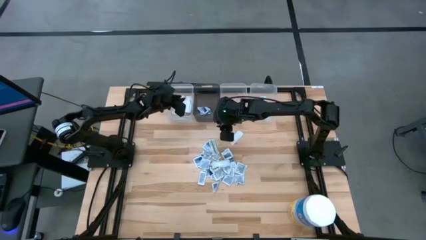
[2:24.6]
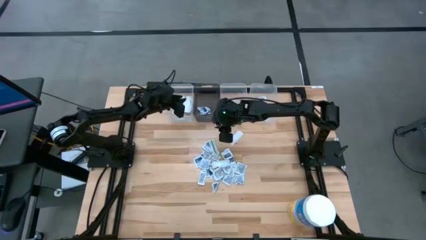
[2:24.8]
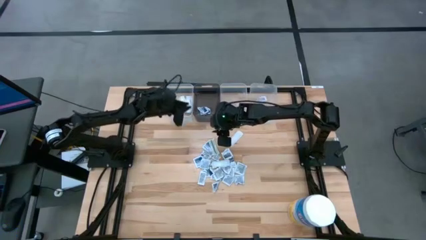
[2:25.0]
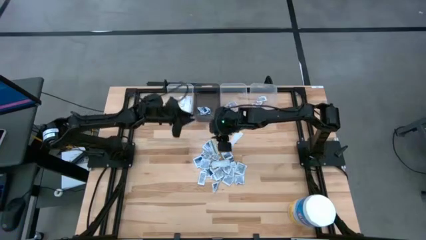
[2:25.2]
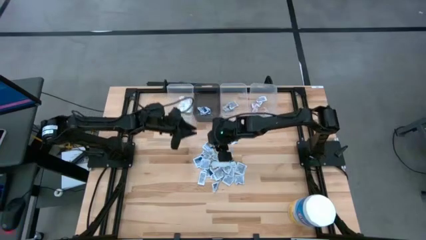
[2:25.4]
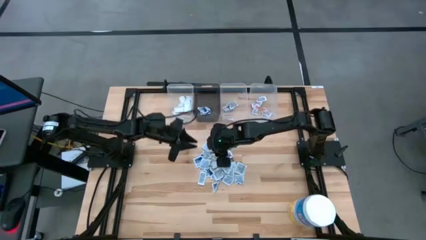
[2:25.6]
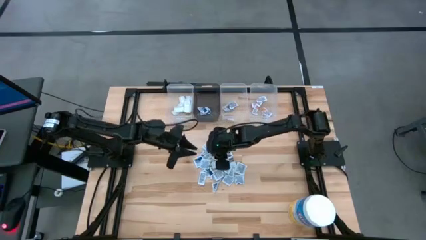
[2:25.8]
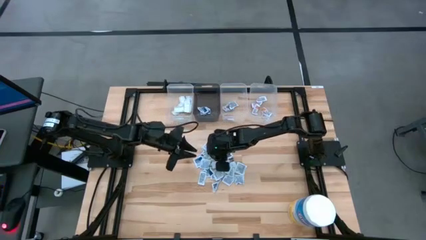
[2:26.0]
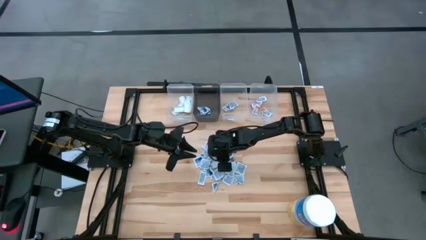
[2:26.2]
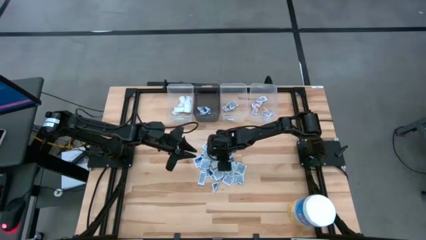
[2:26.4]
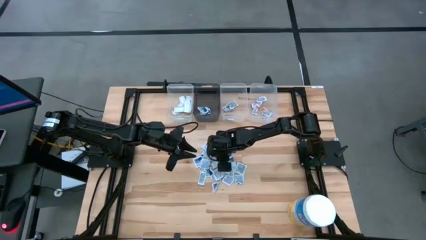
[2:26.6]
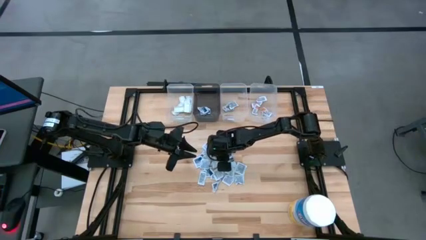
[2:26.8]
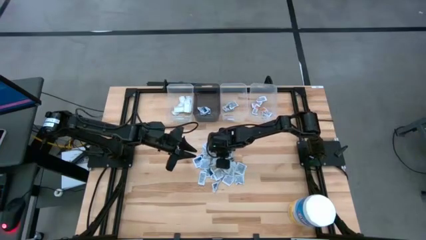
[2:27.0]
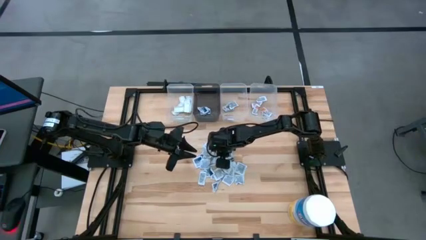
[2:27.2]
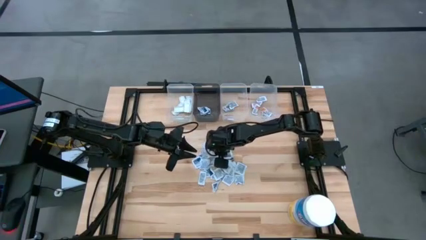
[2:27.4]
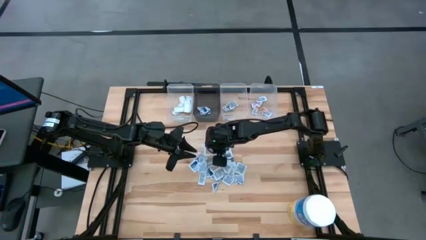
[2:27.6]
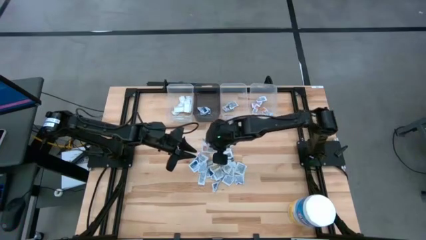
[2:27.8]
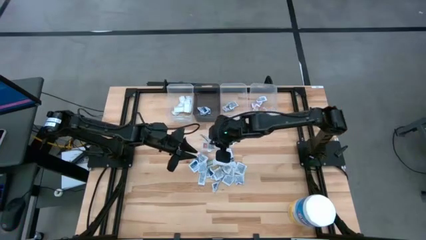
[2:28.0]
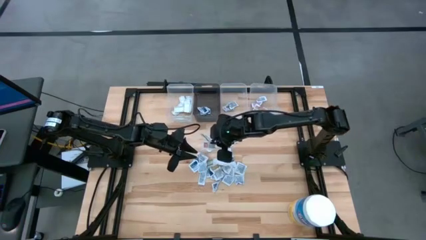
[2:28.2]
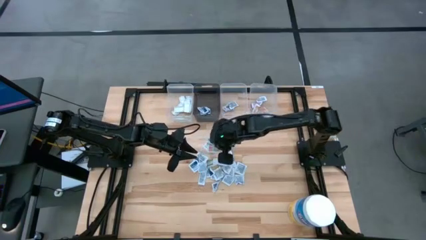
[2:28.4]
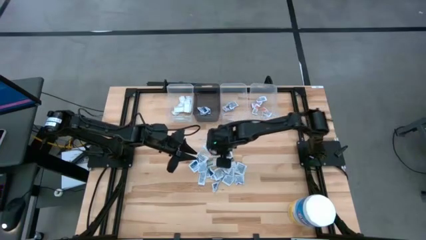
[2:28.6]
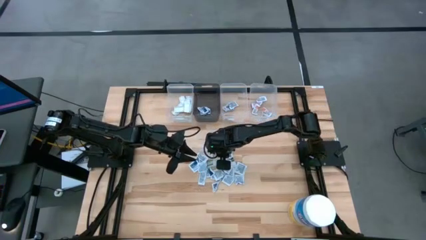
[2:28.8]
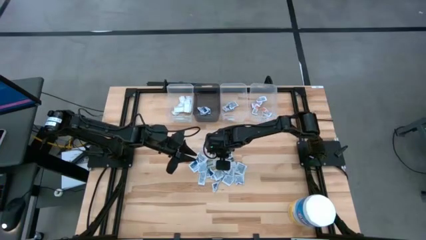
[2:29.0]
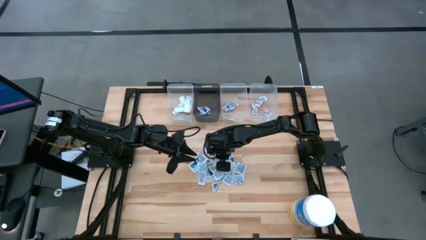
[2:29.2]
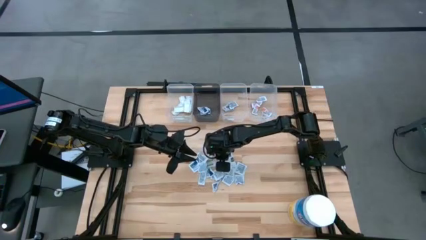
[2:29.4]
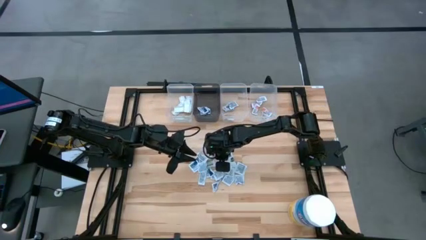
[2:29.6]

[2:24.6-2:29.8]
Task: Pick & Place First Aid Supplies
Put the bandage into the left transparent bin

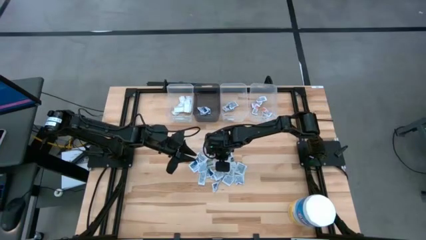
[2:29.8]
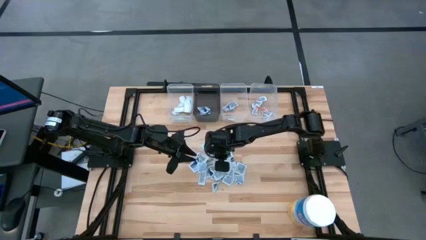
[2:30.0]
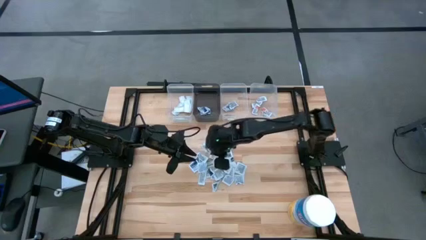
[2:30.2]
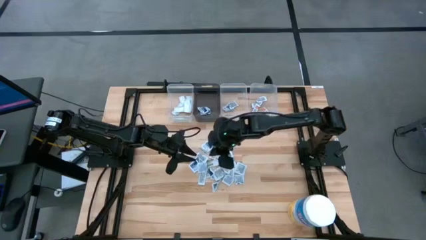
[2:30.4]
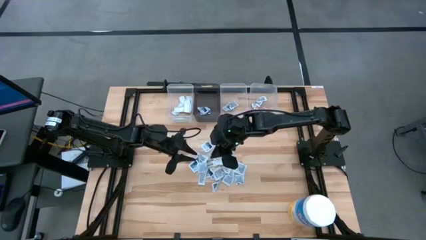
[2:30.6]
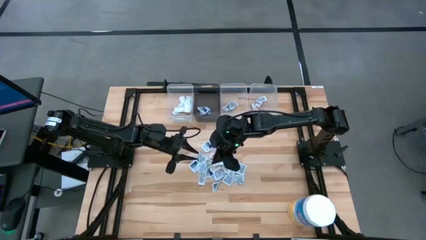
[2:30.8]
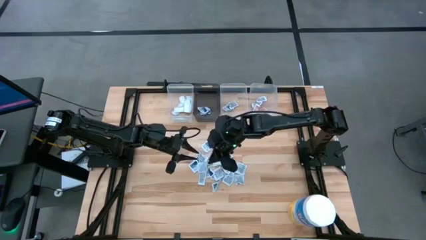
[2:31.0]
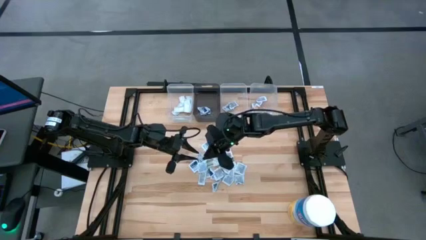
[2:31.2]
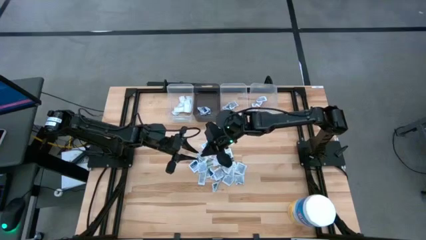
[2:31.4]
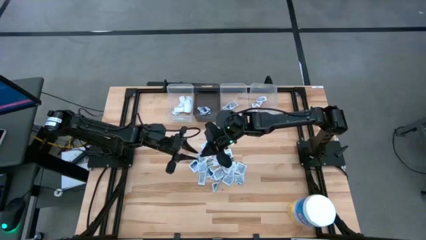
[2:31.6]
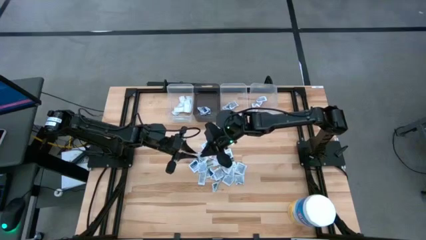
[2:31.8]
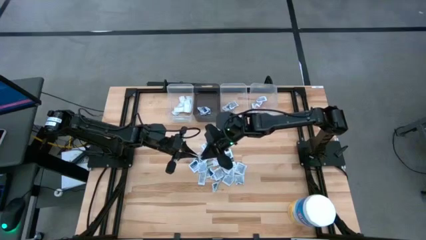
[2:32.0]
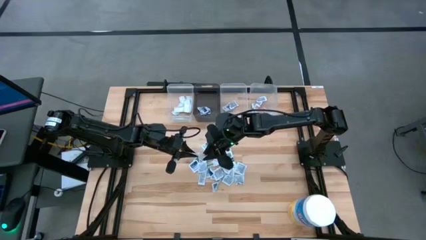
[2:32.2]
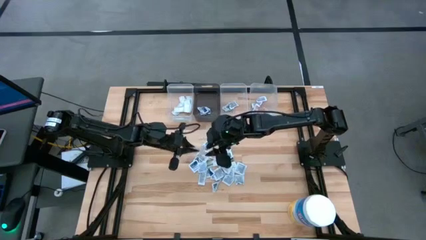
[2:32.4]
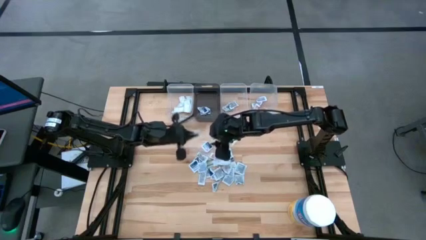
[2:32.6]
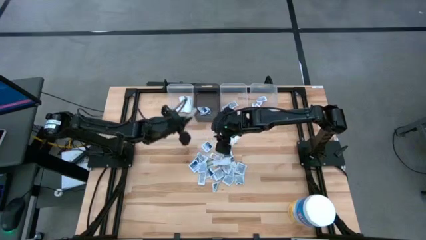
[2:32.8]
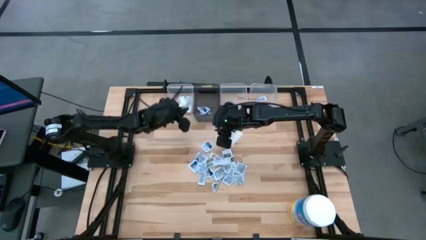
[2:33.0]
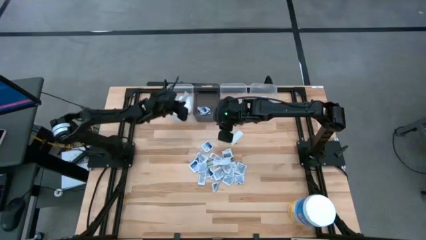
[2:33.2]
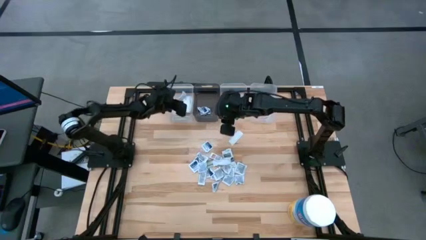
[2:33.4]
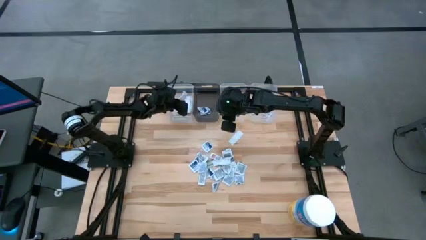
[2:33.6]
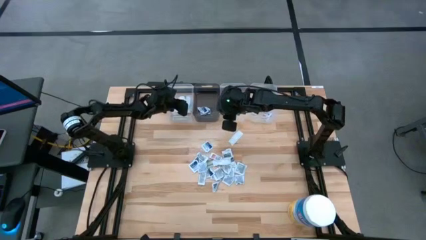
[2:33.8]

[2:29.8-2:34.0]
Put the bandage into the left transparent bin

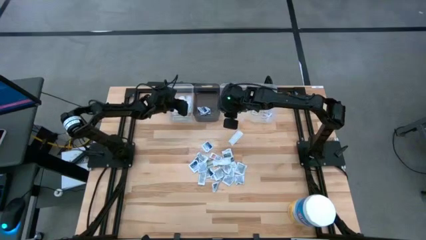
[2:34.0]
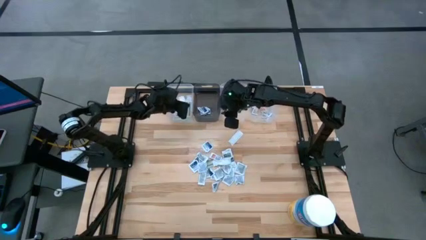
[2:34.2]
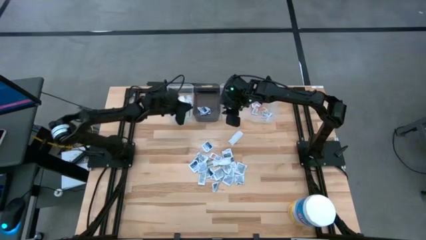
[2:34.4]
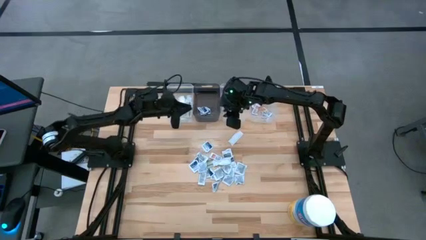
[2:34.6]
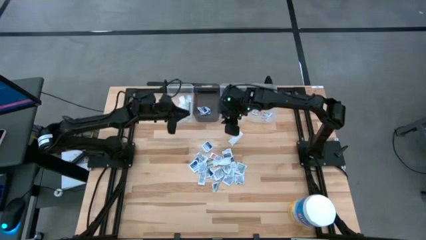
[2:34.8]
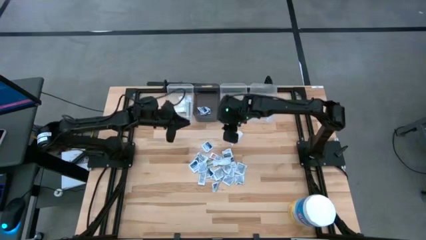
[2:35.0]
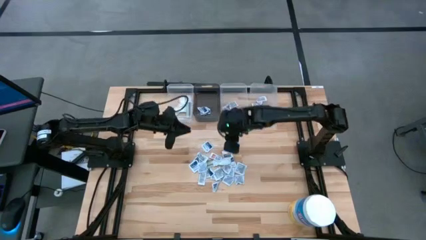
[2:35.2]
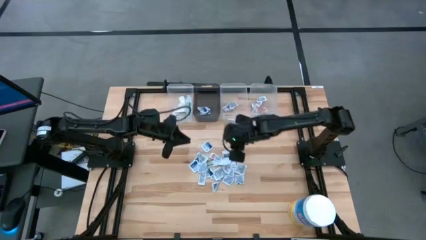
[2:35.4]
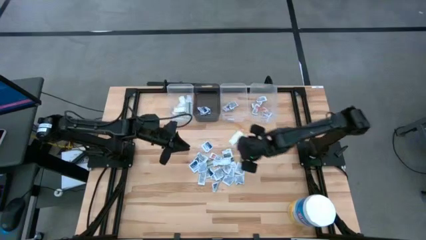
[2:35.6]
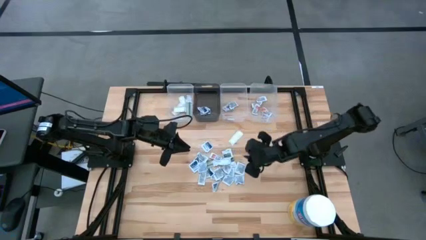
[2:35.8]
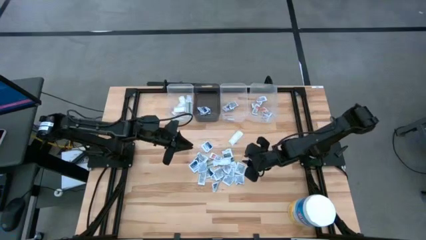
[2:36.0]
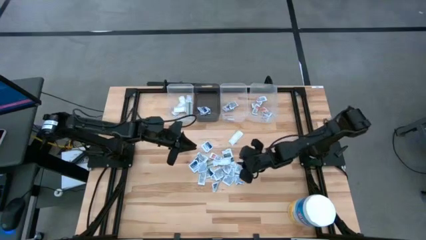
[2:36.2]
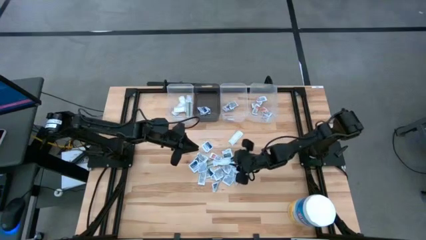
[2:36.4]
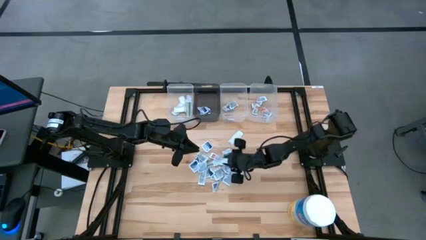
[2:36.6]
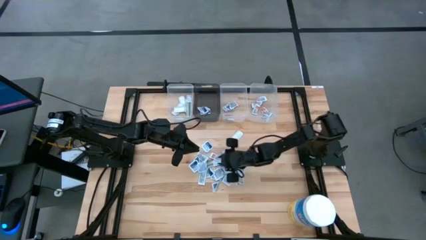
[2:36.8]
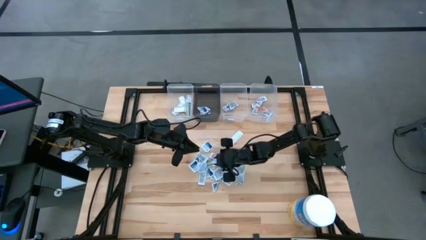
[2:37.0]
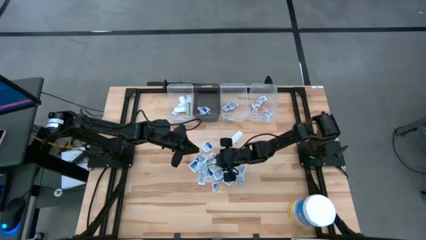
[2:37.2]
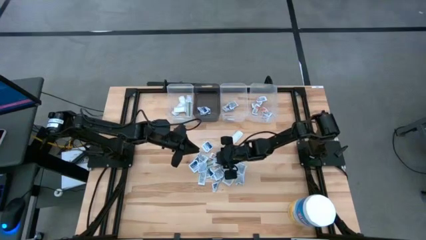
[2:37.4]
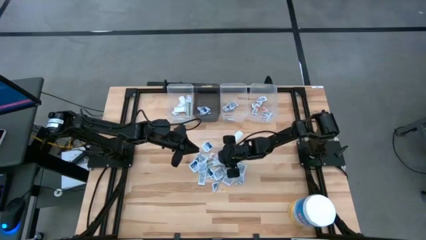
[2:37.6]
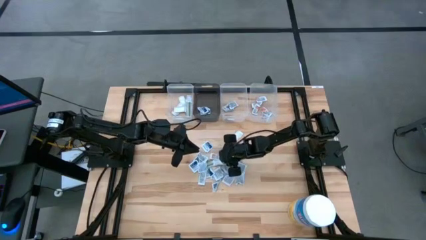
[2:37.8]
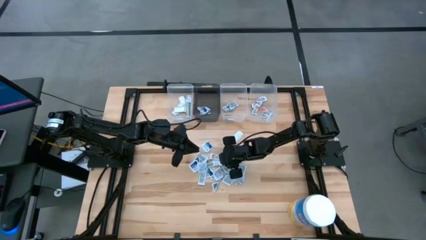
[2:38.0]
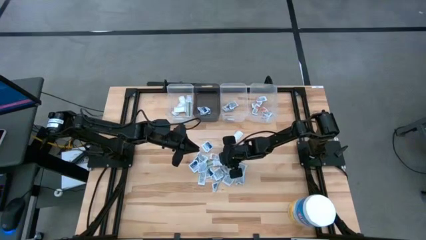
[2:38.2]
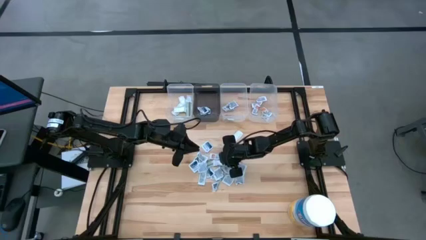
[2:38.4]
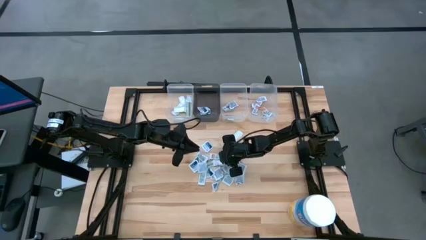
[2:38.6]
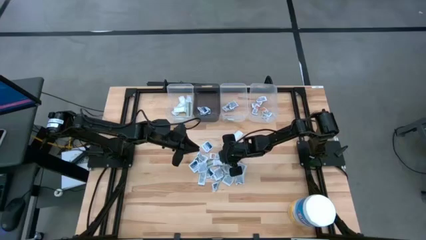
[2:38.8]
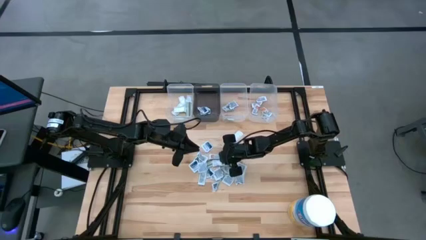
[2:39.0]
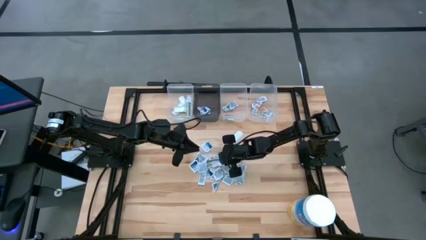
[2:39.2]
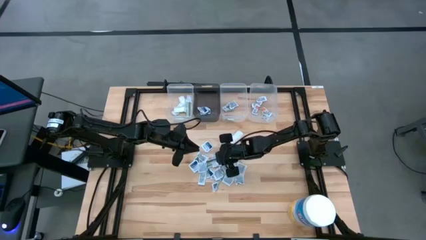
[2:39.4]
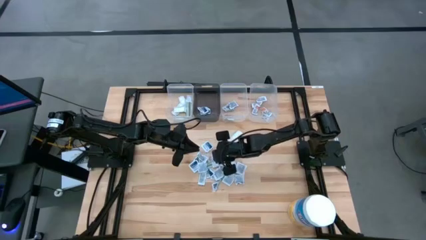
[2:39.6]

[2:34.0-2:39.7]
Put the ointment pack into the right transparent bin

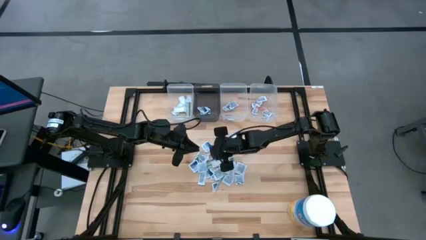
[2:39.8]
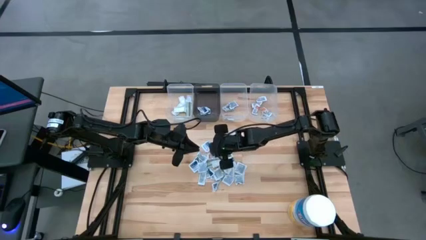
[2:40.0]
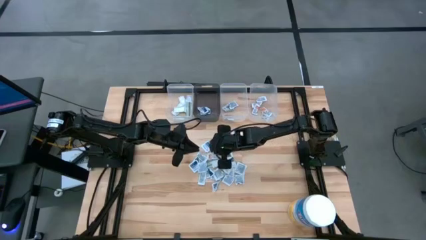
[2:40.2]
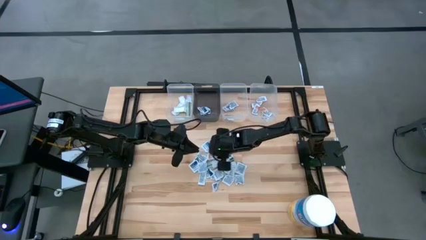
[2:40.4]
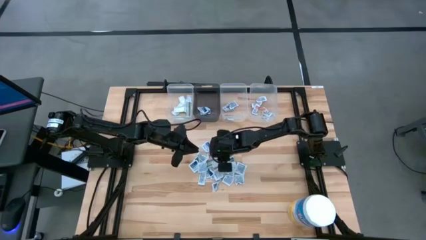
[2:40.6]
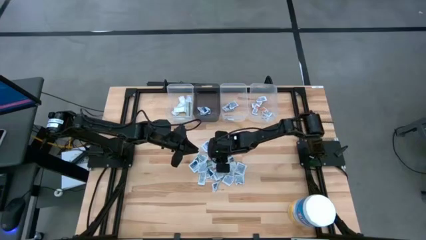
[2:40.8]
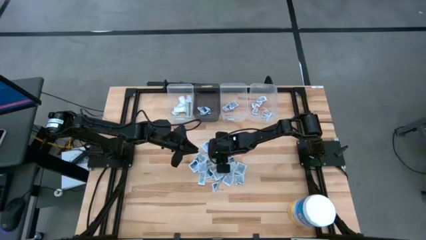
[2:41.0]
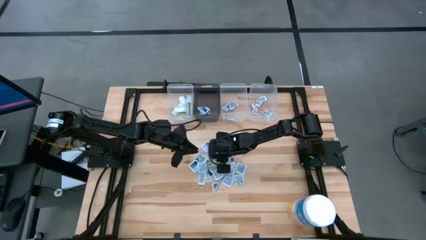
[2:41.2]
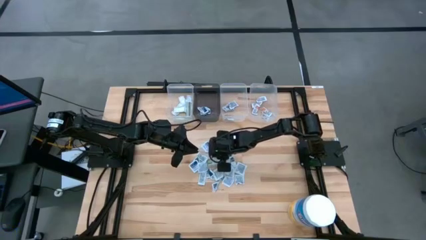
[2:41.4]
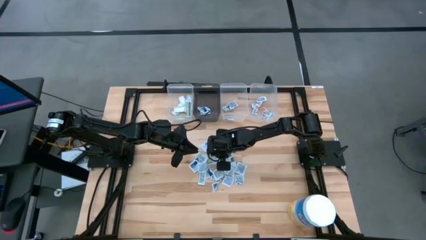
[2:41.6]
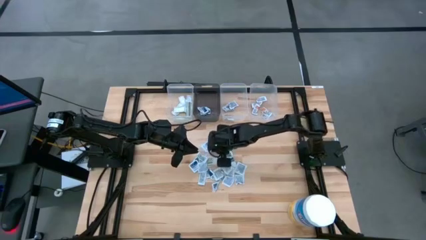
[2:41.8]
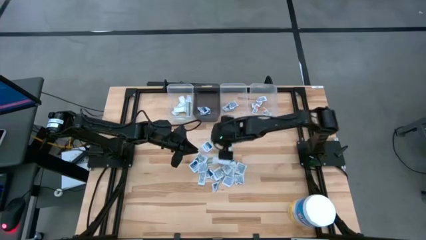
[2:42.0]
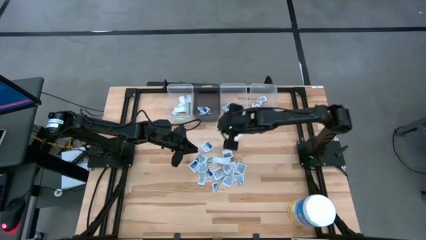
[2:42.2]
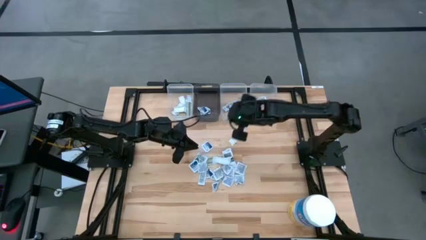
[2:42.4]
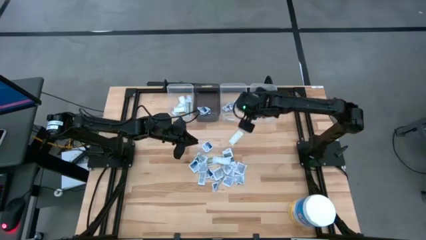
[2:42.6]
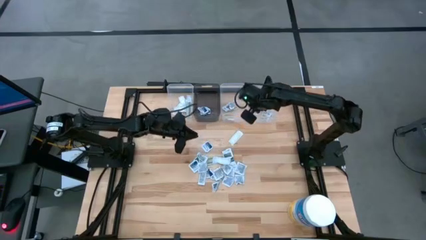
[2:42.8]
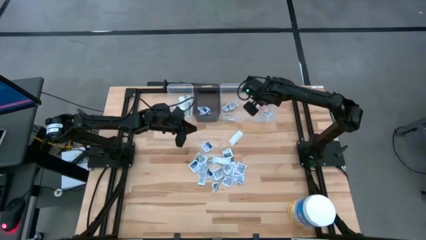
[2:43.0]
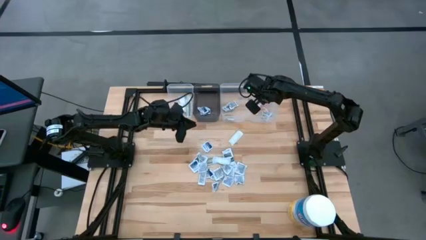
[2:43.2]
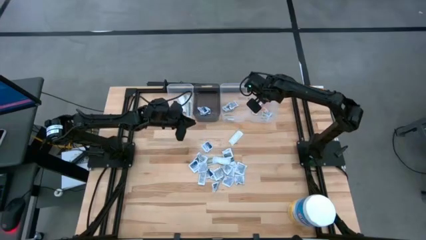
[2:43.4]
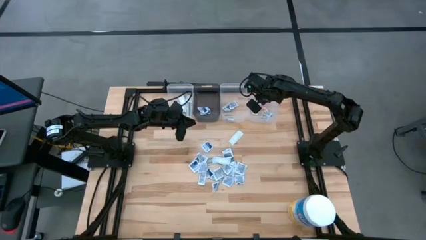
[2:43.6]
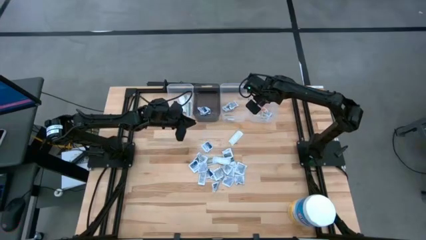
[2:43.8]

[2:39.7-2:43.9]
Put the ointment pack into the right transparent bin
